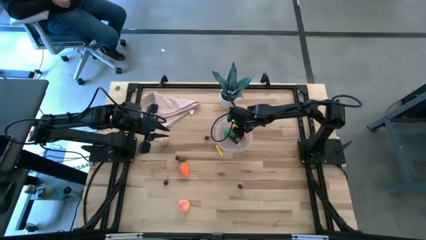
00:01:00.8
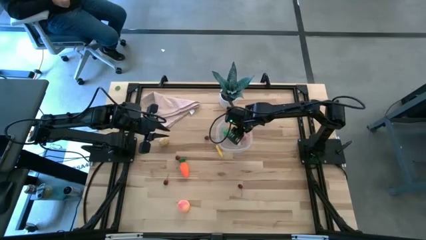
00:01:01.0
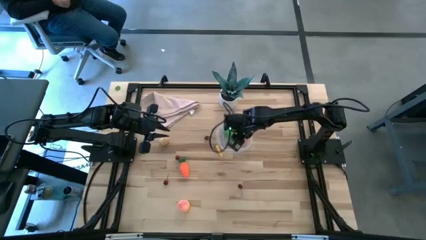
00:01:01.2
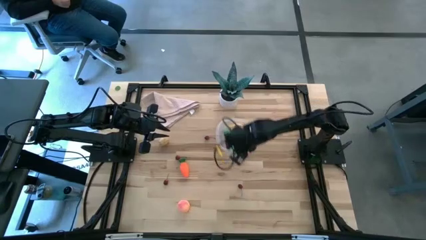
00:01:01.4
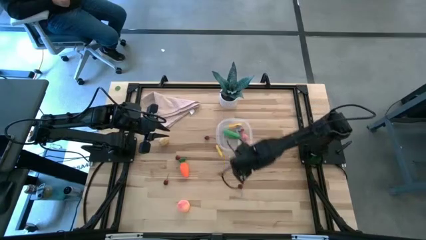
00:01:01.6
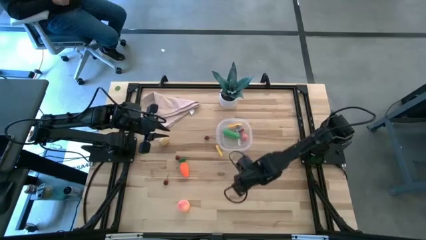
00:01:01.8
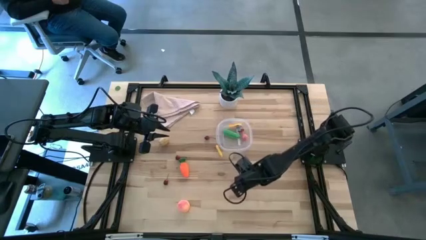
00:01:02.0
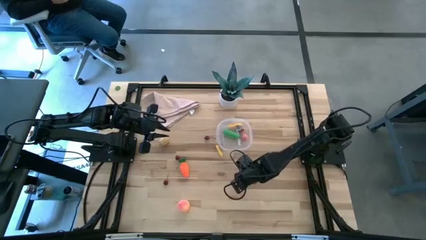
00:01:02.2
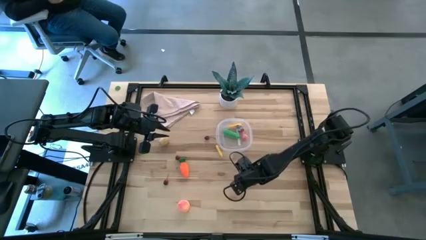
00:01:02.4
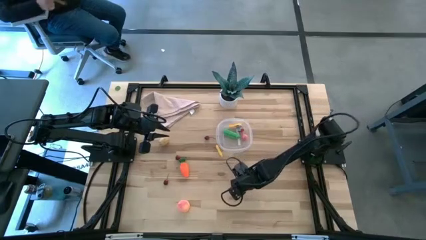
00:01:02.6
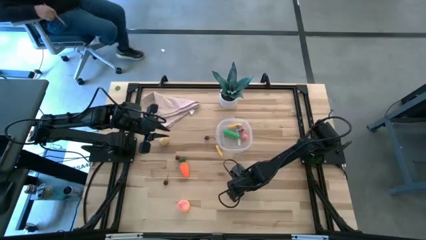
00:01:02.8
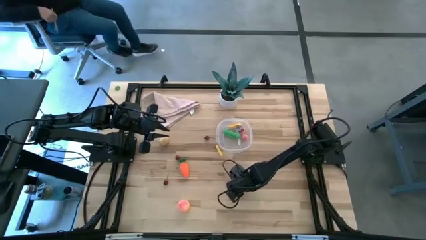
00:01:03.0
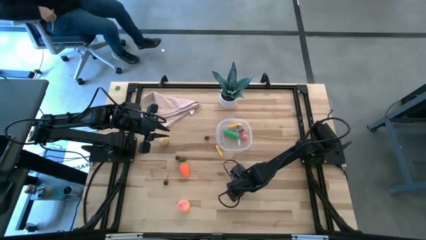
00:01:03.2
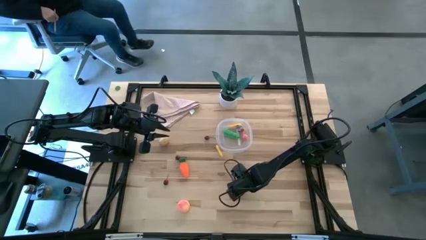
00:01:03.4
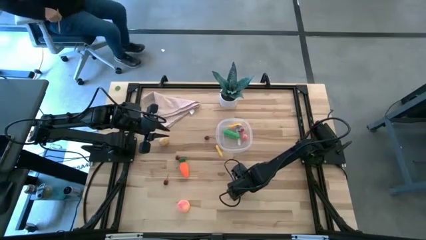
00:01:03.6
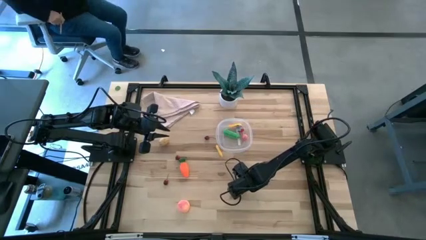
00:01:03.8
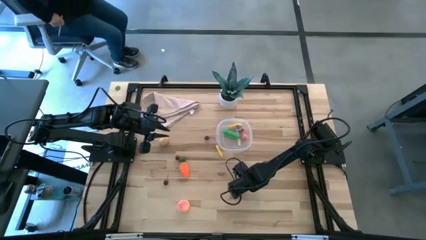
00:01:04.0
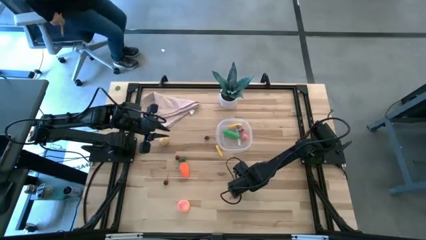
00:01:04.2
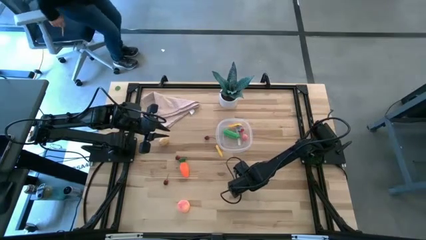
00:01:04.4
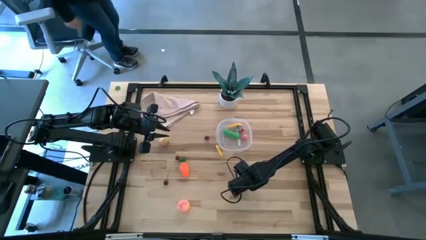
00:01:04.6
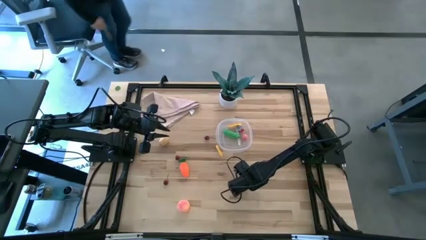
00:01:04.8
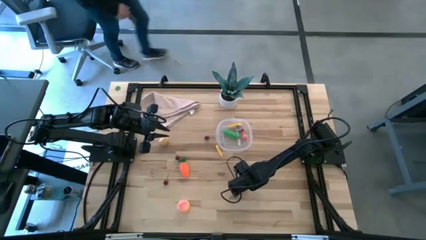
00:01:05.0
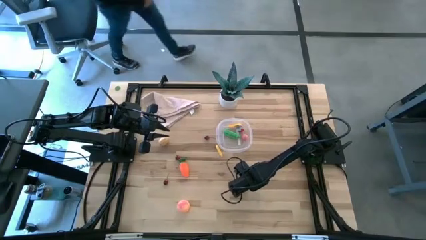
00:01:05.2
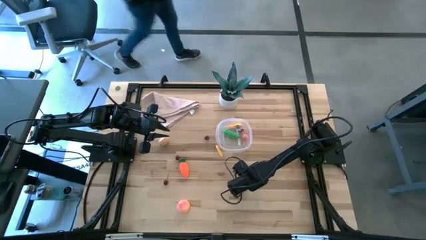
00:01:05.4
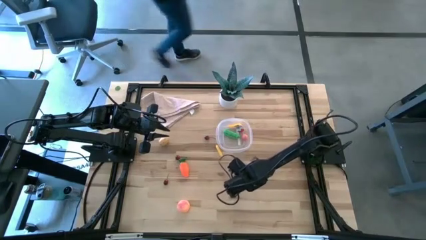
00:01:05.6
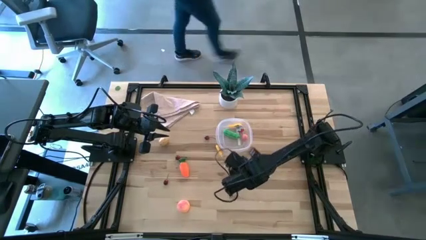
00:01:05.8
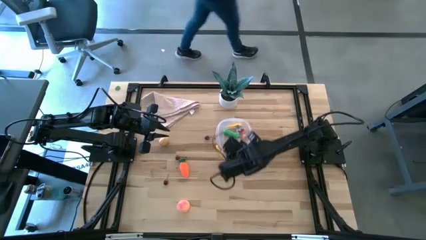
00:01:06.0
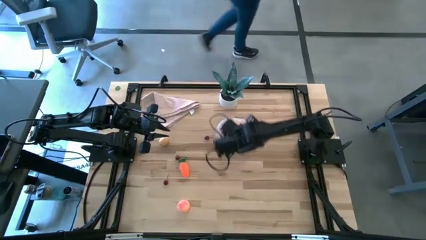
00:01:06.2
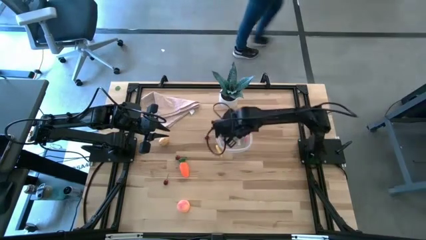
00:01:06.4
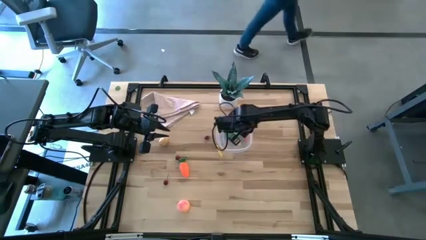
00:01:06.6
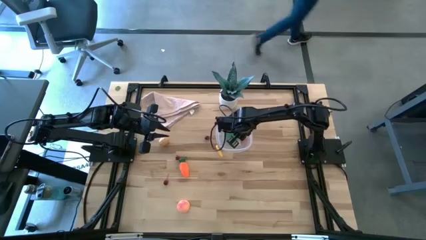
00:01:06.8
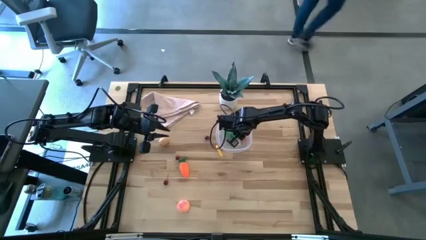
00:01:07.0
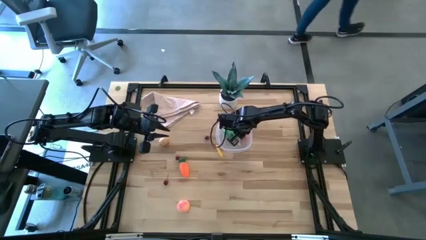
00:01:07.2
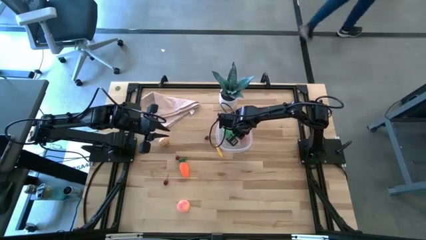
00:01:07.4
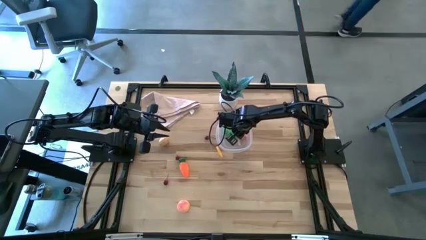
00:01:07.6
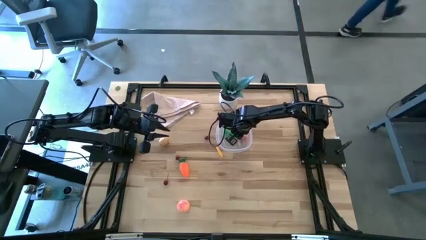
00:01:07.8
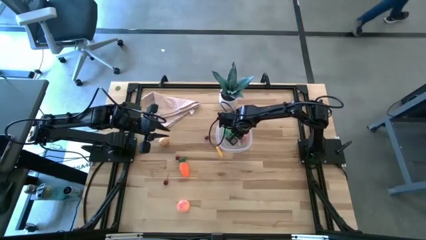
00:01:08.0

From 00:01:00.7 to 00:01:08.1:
Task: Pick and placing Produce into tupperware
Put the bottom right cherry into the transparent bin

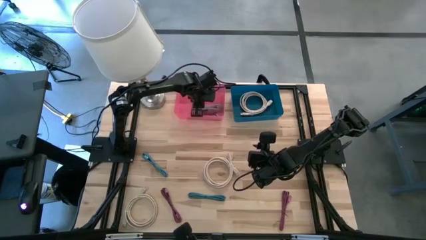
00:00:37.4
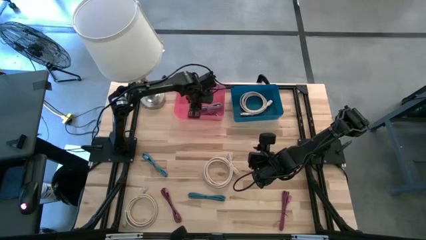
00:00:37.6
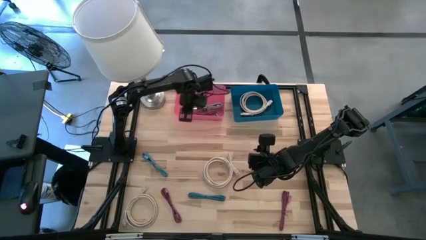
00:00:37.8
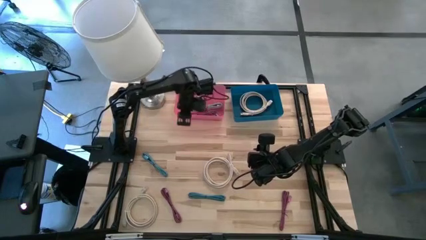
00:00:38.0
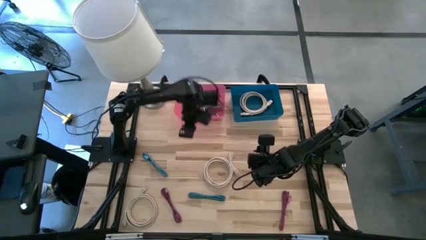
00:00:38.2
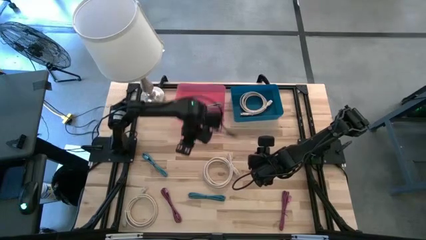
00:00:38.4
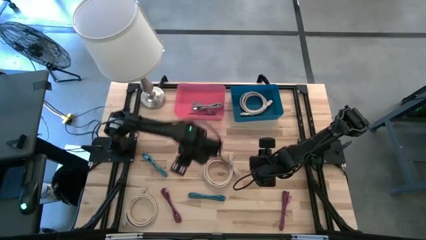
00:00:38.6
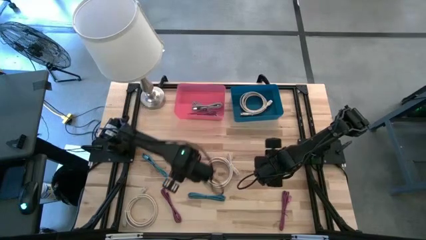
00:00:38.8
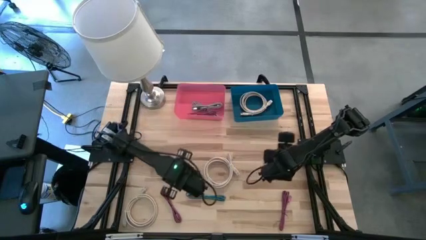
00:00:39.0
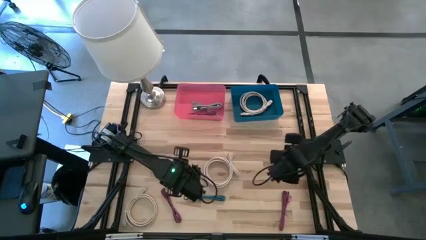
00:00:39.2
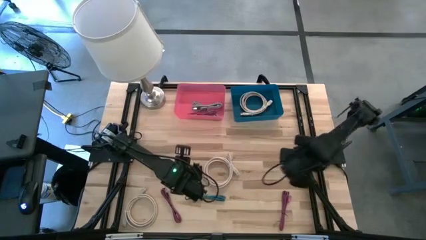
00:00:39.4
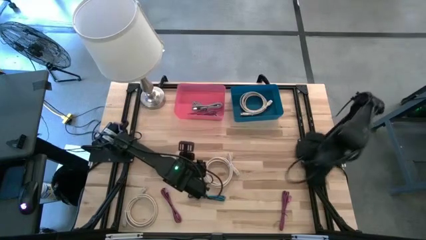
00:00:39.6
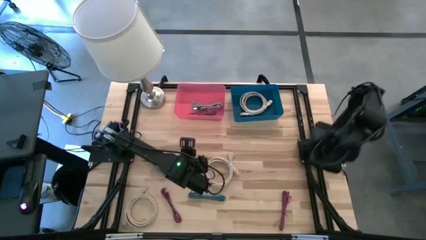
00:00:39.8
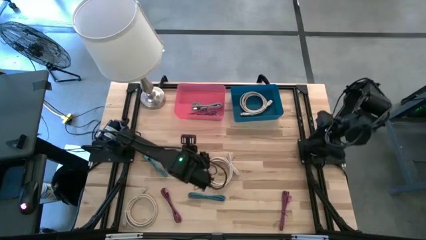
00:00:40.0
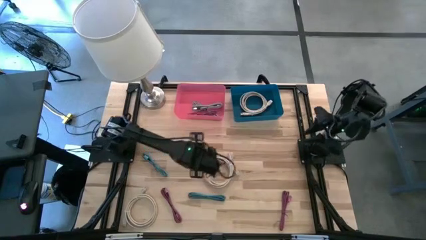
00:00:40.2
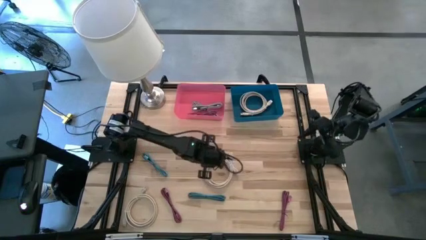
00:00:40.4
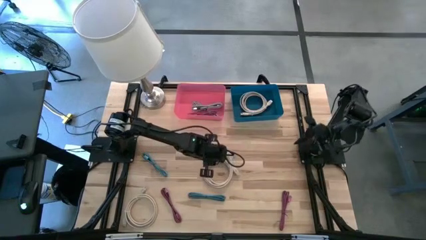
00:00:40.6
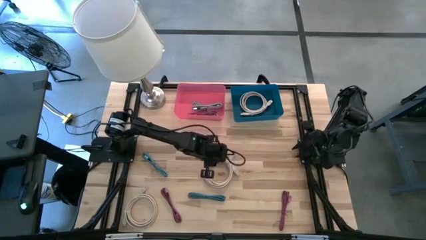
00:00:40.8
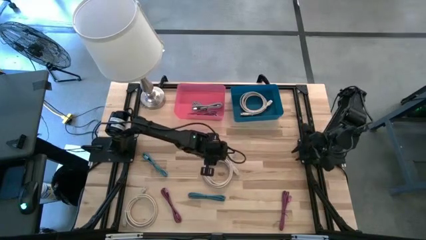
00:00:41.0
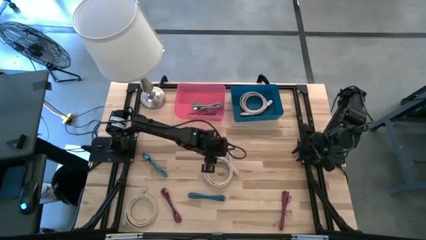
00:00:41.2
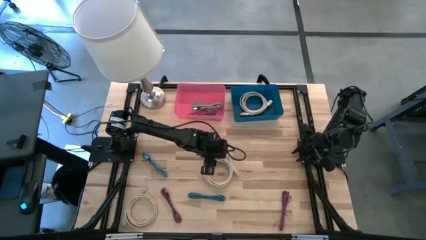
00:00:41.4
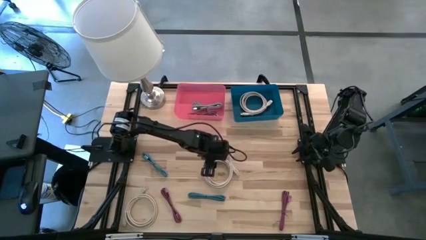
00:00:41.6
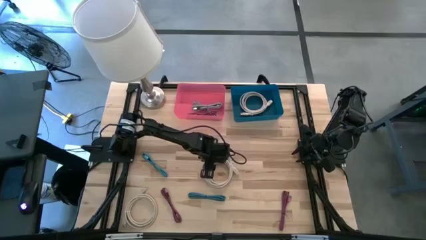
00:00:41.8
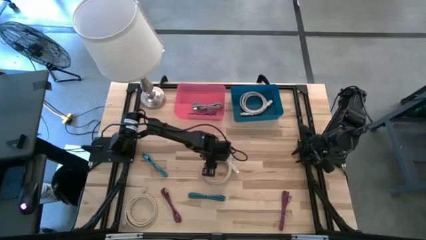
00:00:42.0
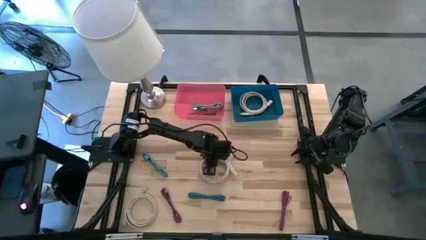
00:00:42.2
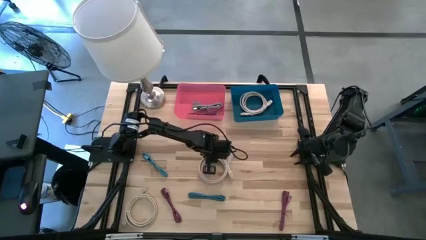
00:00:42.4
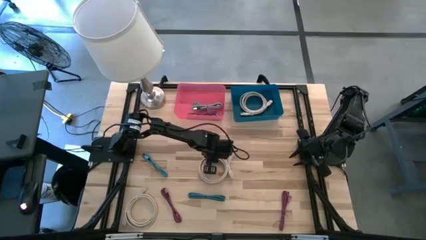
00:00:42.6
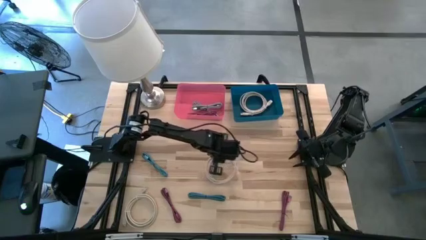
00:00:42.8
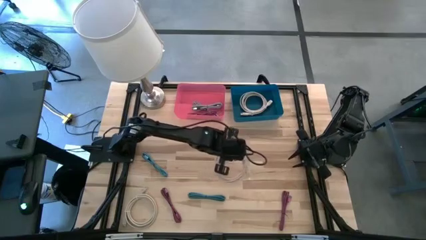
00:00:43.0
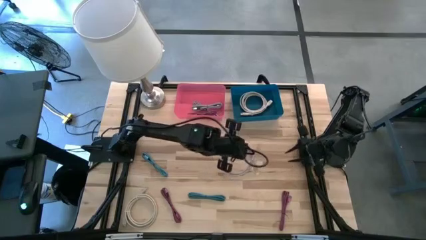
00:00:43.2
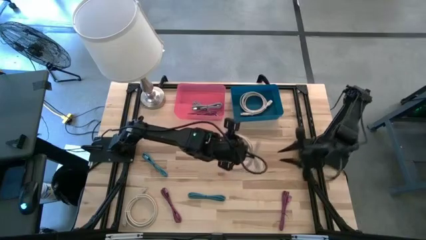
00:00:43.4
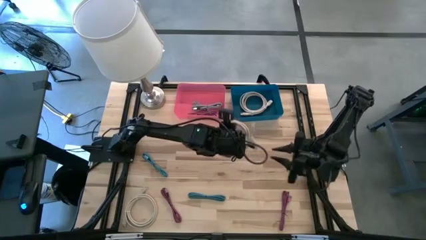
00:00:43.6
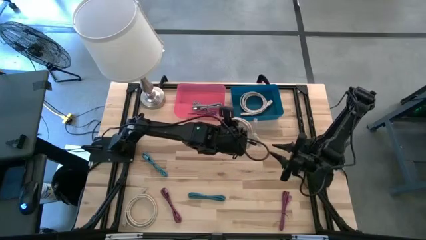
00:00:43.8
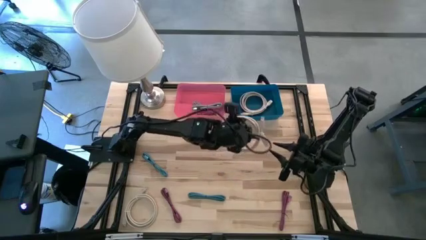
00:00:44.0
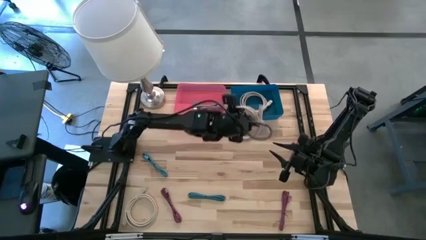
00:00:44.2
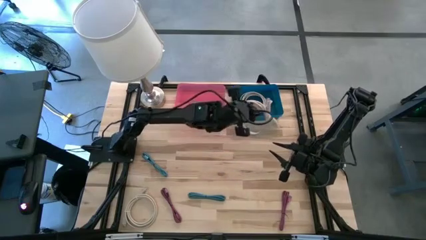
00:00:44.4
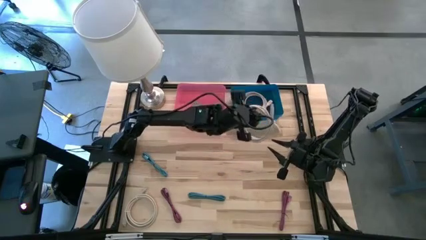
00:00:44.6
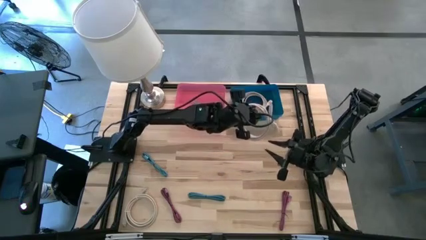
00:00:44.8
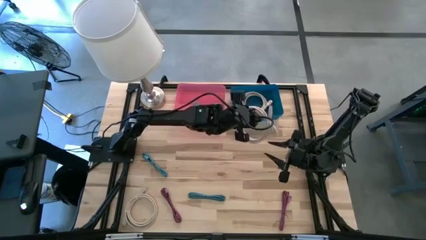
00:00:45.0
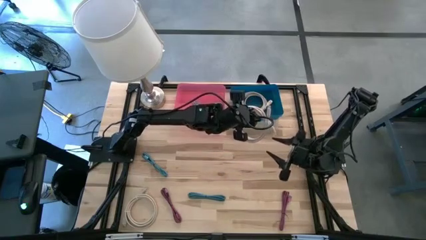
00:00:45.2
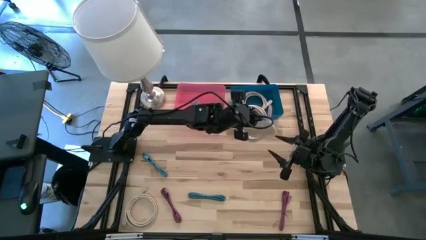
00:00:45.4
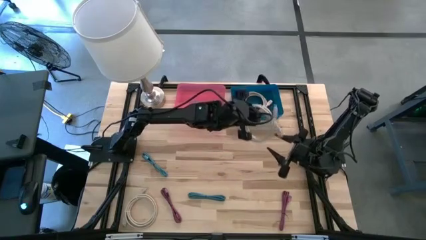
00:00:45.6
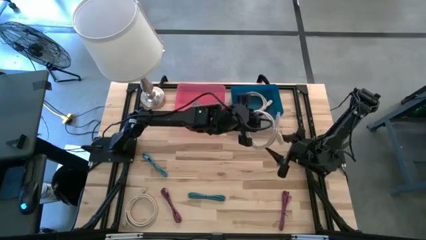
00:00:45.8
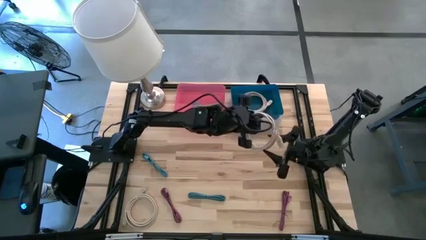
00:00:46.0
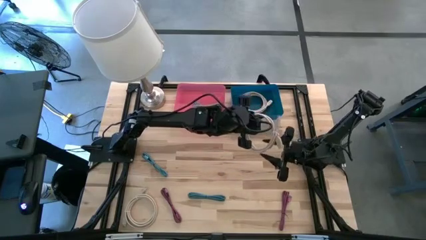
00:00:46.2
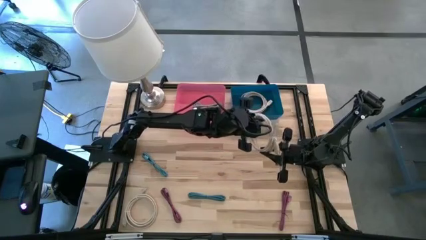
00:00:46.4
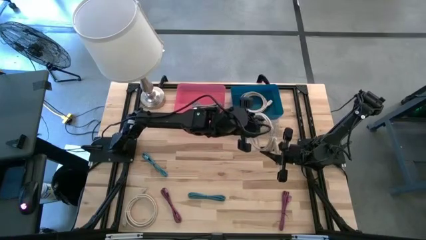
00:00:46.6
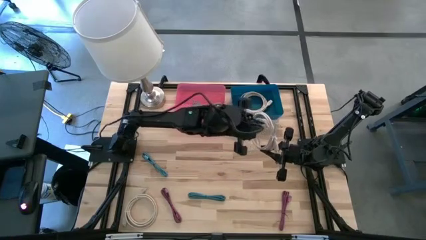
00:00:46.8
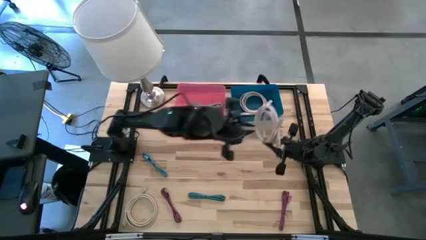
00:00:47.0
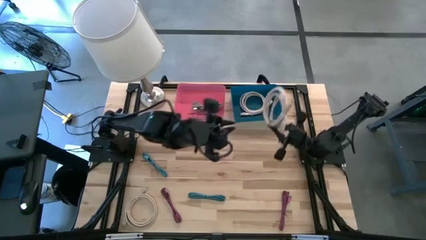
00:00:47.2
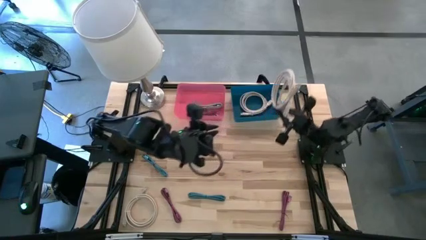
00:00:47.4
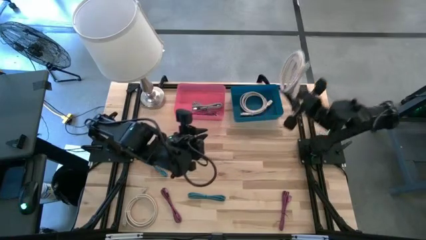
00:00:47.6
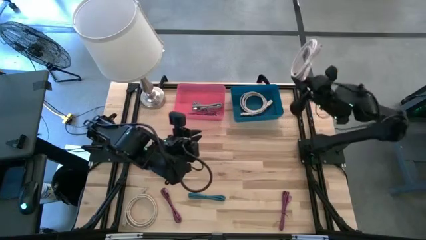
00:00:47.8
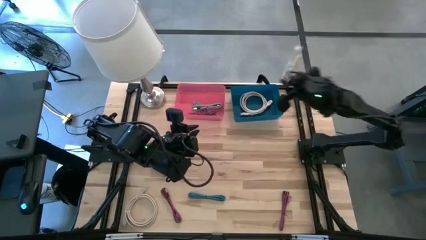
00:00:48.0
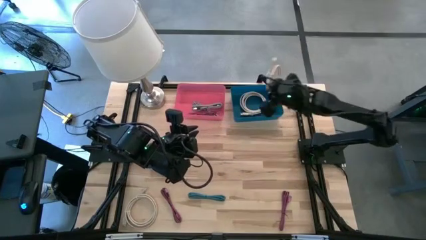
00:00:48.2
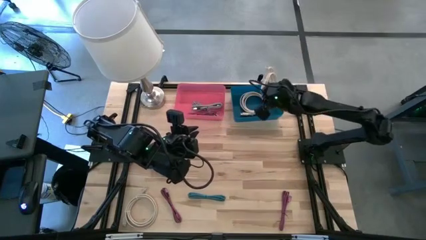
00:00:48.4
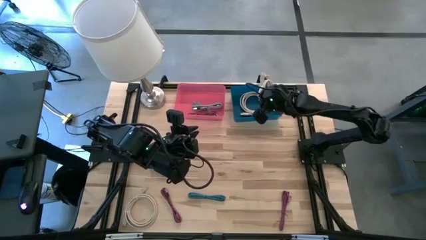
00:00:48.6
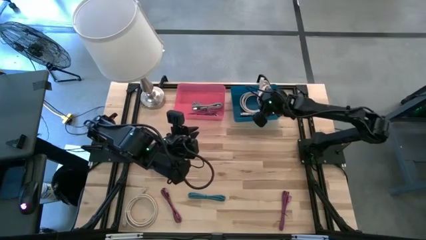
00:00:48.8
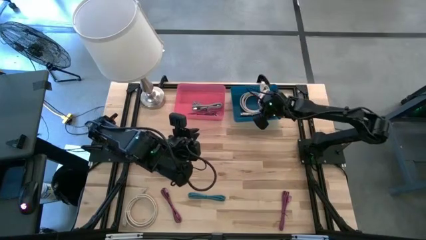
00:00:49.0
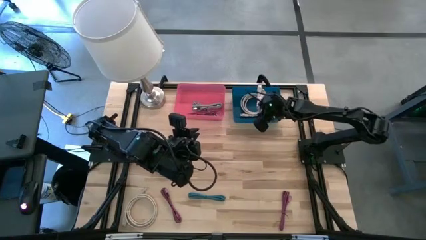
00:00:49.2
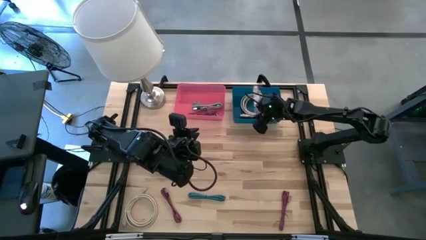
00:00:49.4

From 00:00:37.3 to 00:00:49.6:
Task: Pick & Place USB Port
Put the top brown HDMI cable into the blue bin
